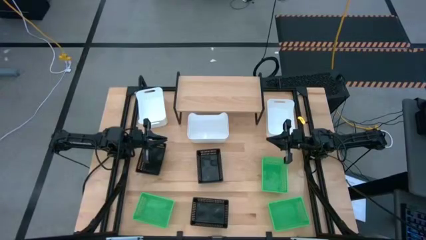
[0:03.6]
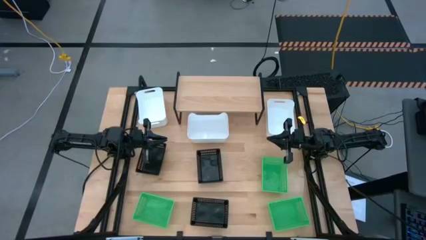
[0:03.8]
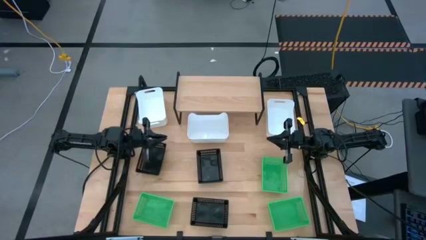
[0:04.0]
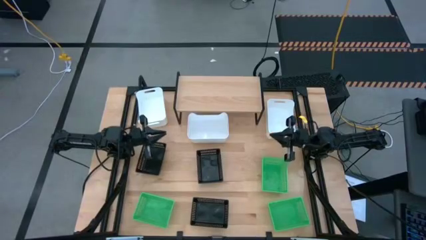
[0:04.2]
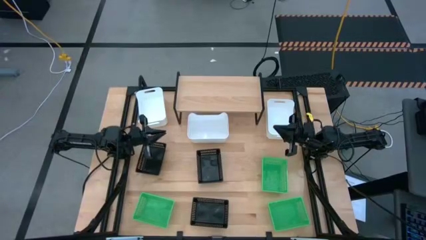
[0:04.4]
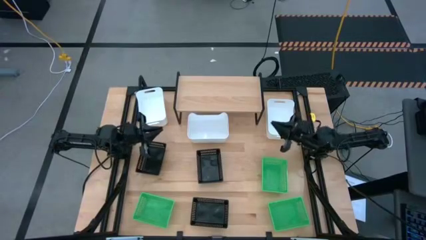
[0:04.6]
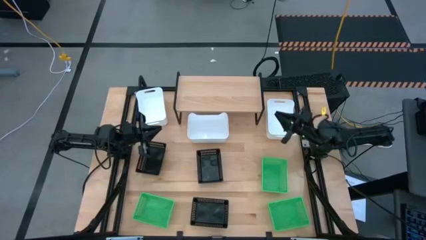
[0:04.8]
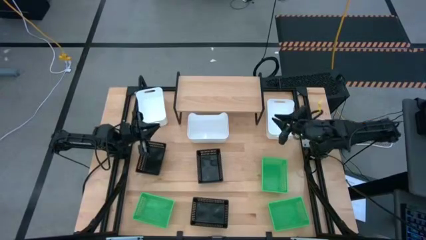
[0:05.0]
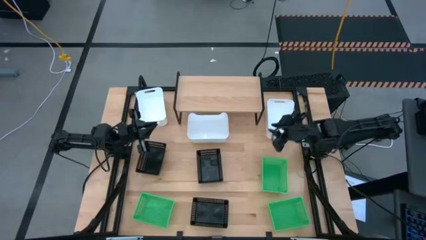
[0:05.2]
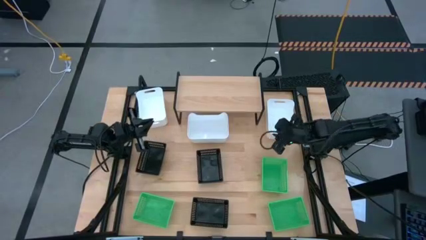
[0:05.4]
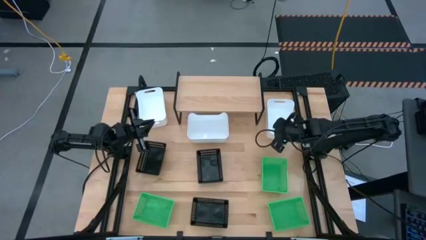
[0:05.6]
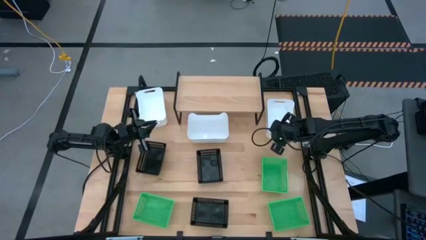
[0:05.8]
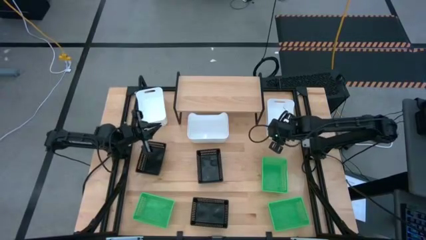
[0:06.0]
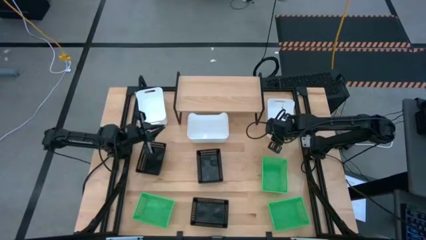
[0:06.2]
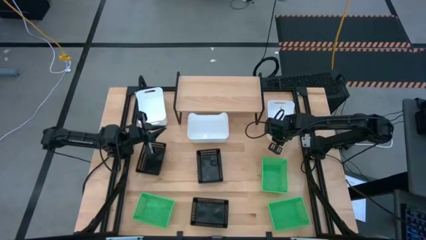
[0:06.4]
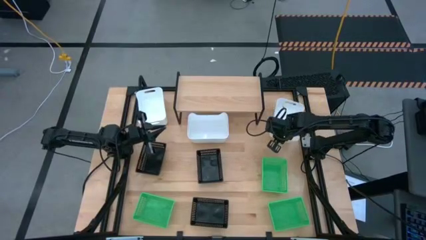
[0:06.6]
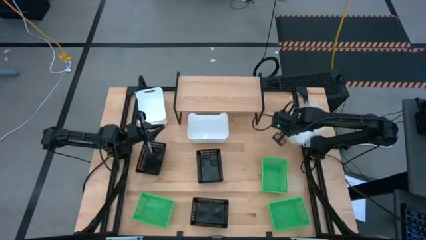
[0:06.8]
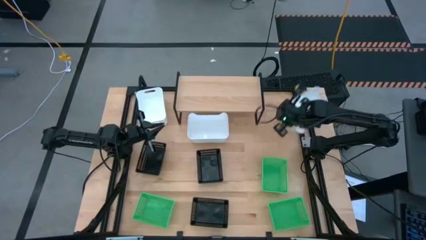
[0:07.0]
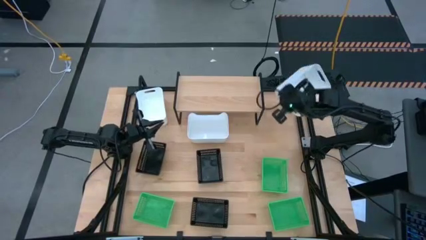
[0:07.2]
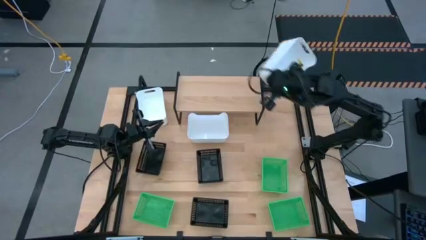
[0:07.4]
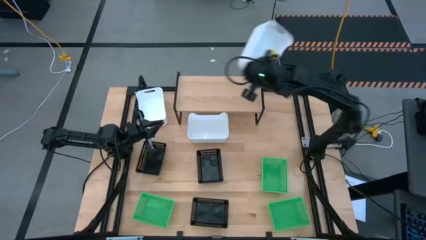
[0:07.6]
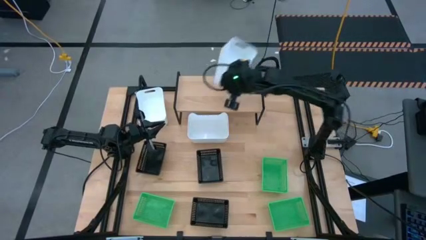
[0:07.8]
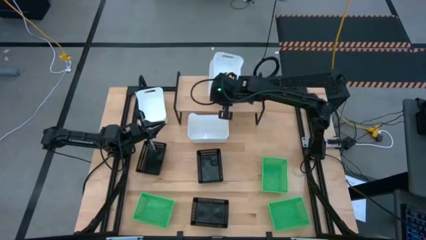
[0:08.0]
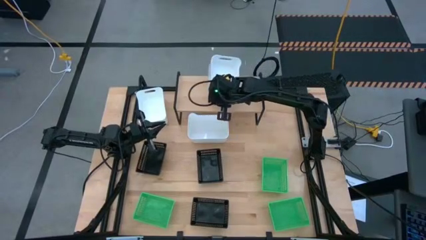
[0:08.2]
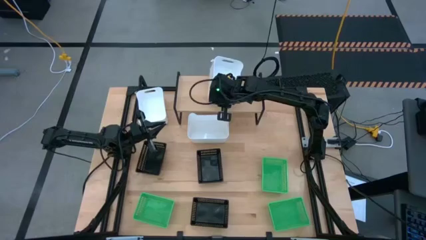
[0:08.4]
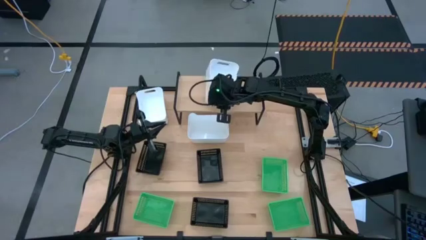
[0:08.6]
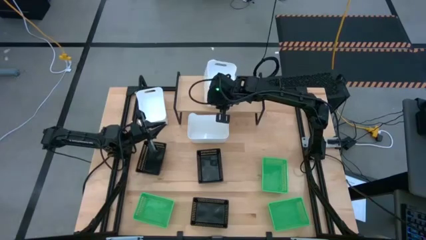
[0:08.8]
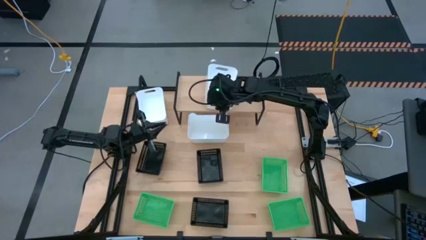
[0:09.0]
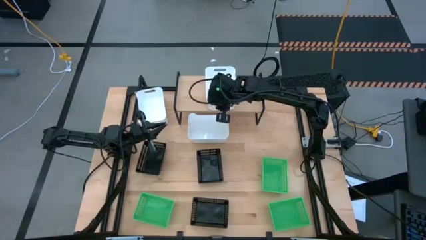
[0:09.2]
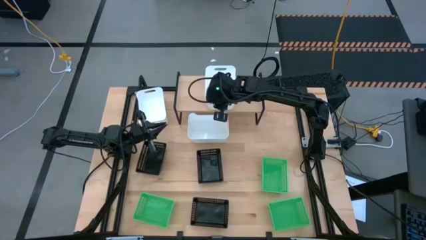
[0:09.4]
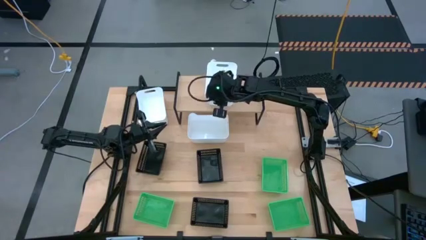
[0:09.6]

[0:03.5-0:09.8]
Task: Stack baskets on shelf by color
Put the right white bin on the shelf

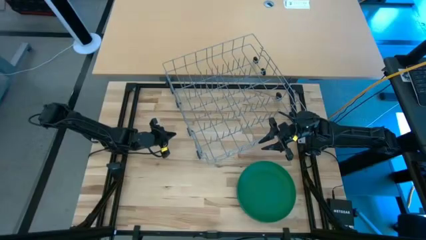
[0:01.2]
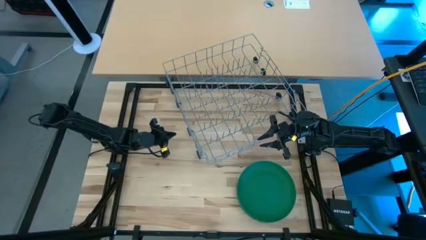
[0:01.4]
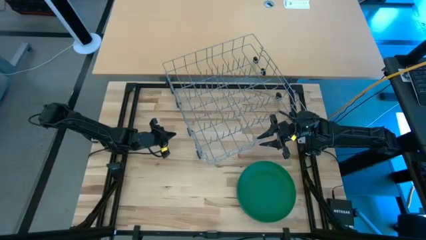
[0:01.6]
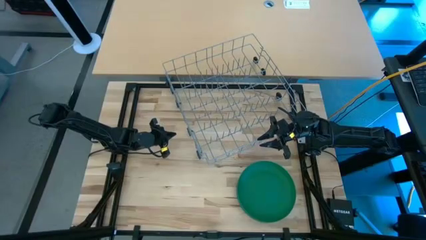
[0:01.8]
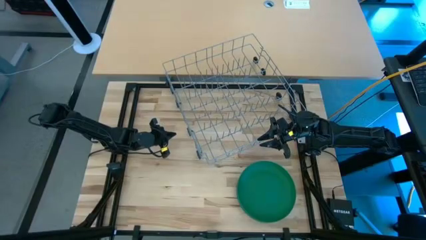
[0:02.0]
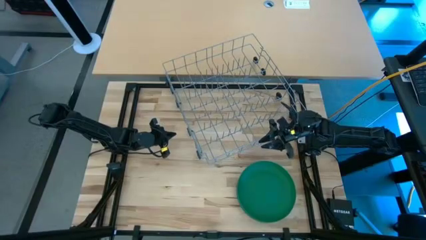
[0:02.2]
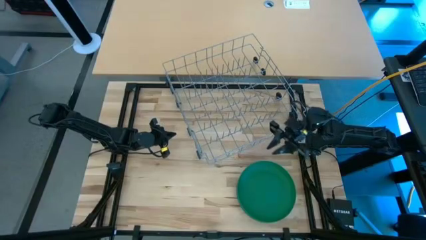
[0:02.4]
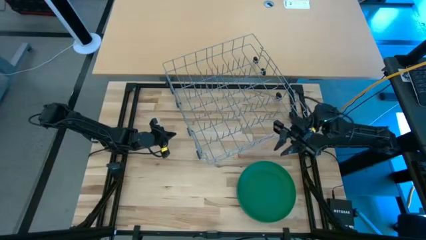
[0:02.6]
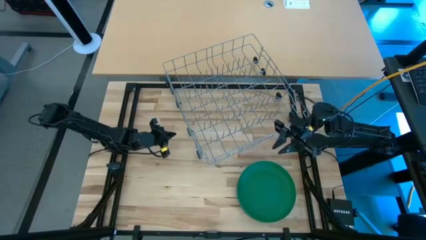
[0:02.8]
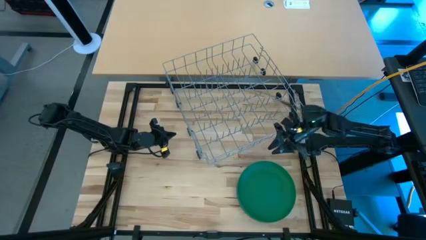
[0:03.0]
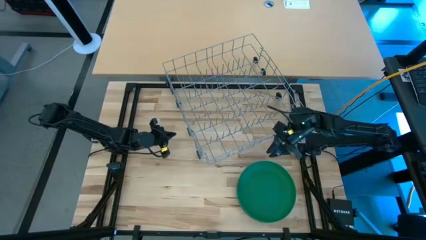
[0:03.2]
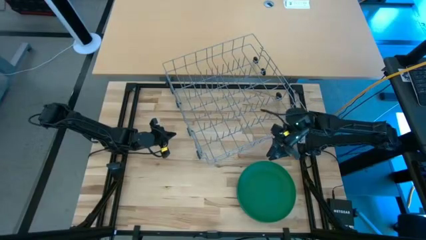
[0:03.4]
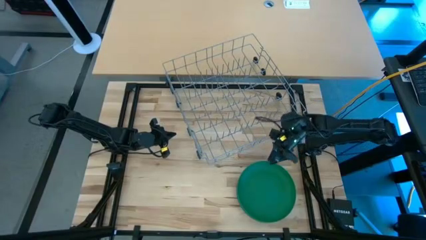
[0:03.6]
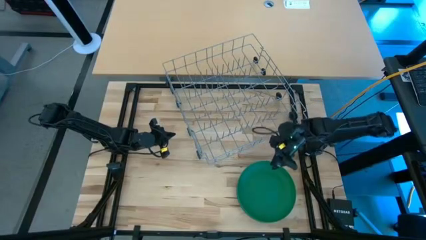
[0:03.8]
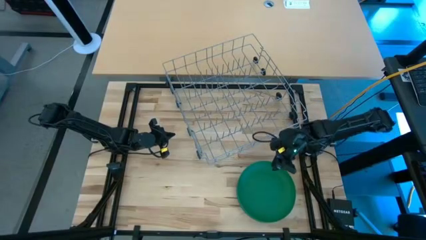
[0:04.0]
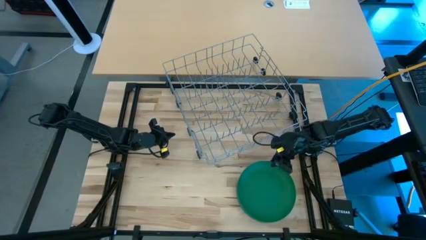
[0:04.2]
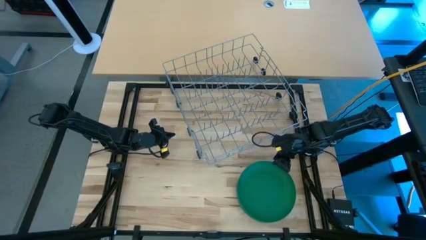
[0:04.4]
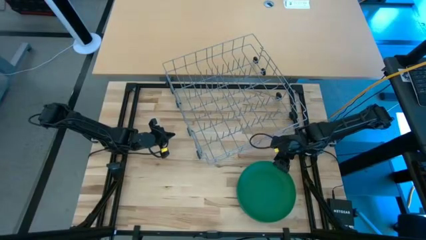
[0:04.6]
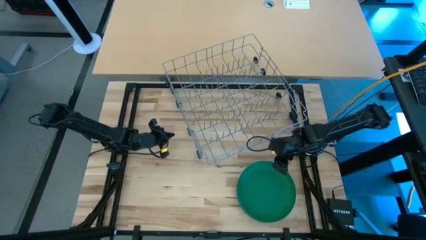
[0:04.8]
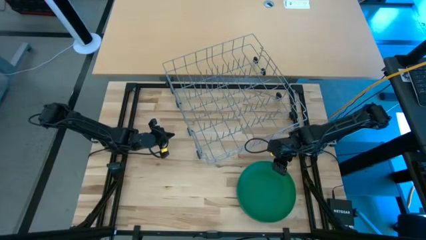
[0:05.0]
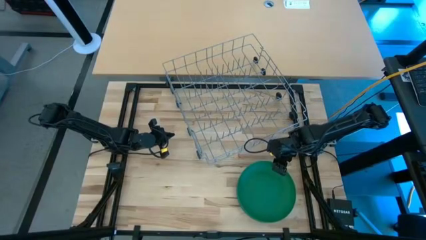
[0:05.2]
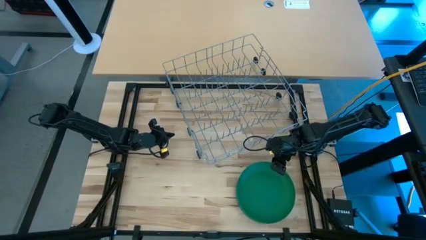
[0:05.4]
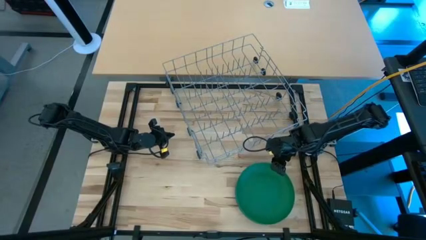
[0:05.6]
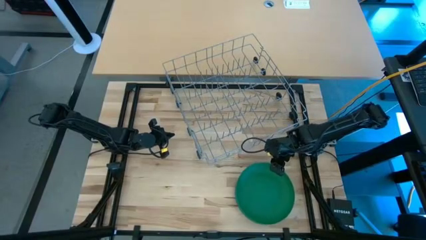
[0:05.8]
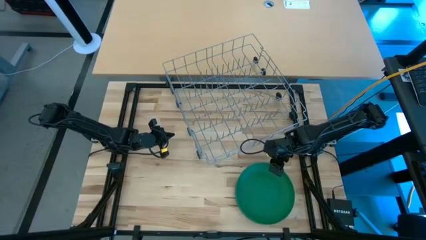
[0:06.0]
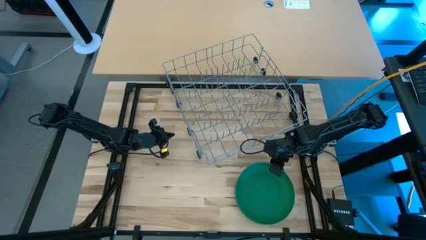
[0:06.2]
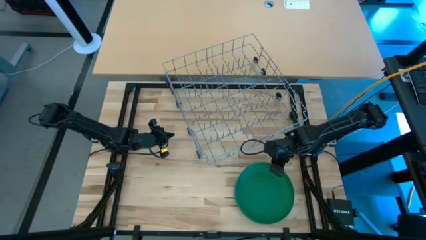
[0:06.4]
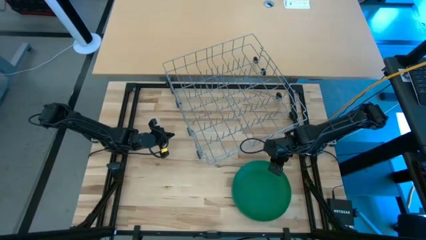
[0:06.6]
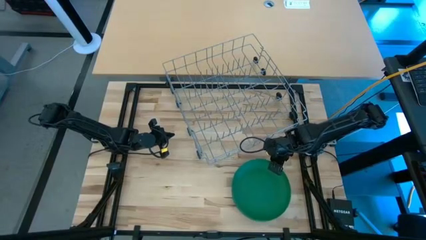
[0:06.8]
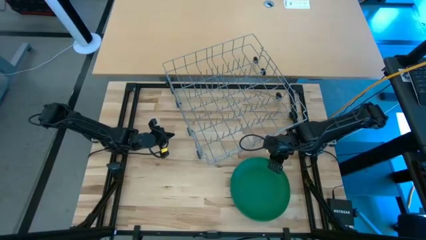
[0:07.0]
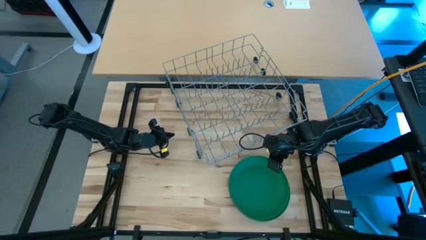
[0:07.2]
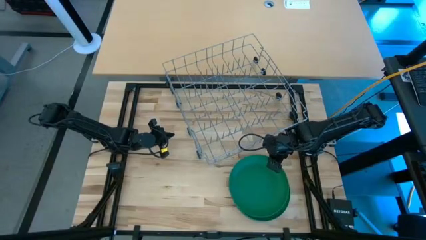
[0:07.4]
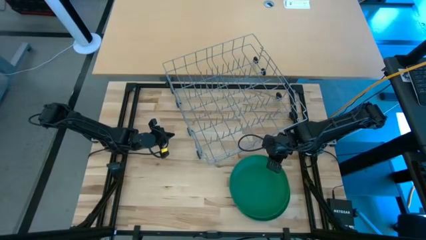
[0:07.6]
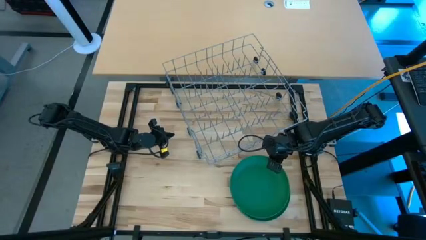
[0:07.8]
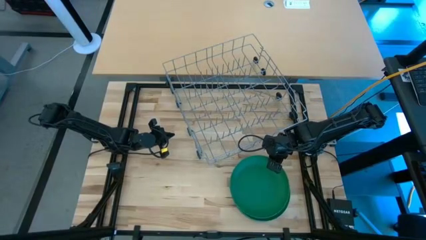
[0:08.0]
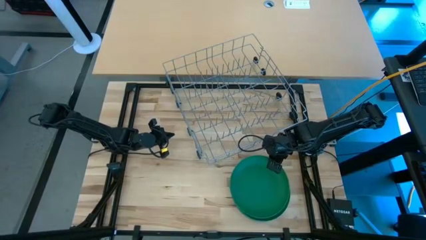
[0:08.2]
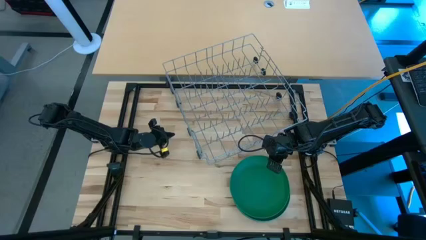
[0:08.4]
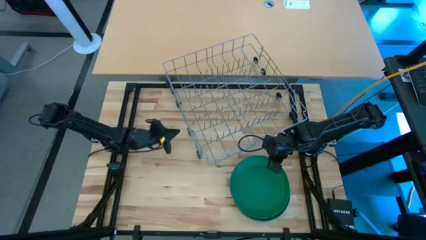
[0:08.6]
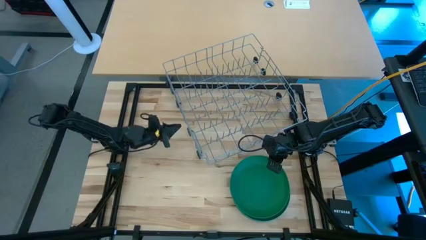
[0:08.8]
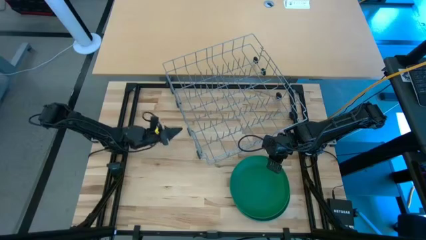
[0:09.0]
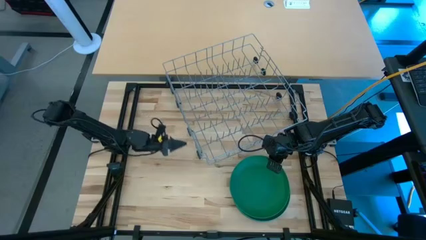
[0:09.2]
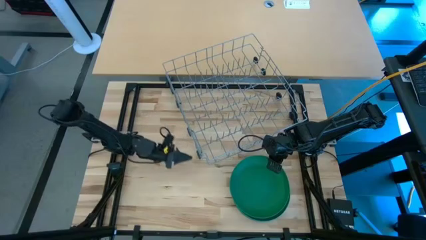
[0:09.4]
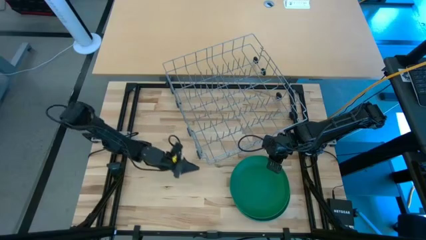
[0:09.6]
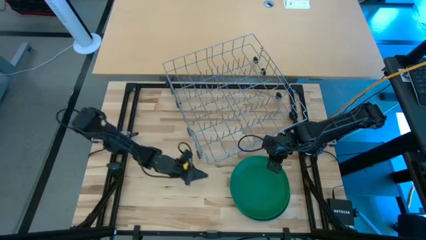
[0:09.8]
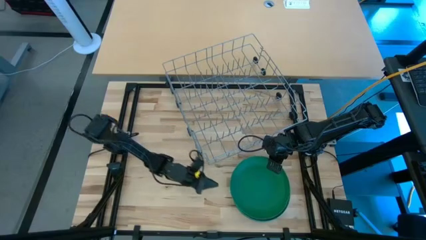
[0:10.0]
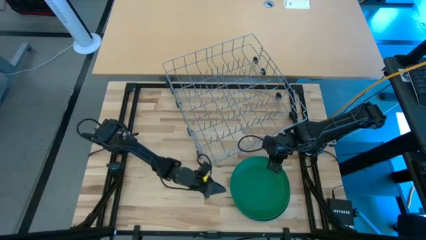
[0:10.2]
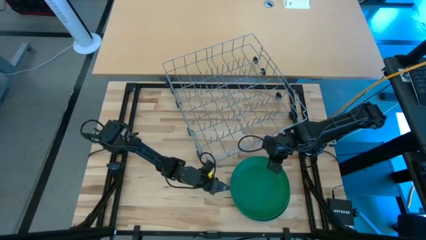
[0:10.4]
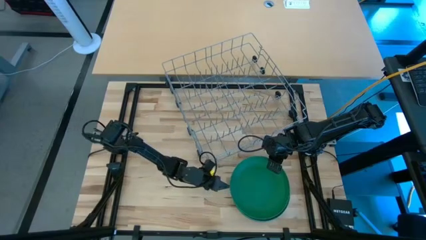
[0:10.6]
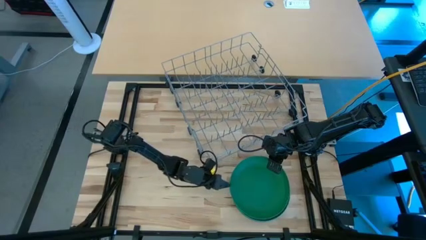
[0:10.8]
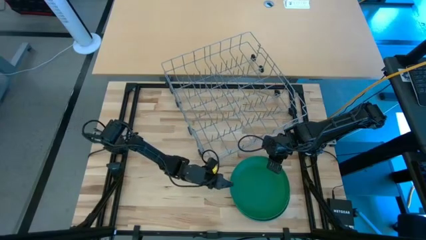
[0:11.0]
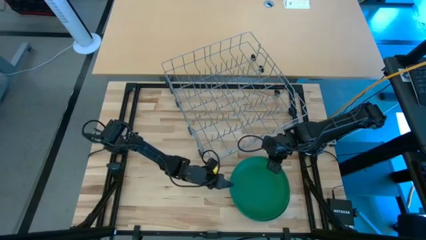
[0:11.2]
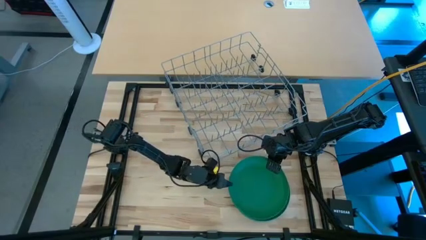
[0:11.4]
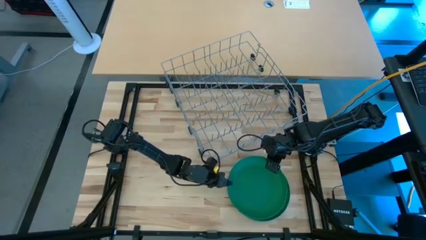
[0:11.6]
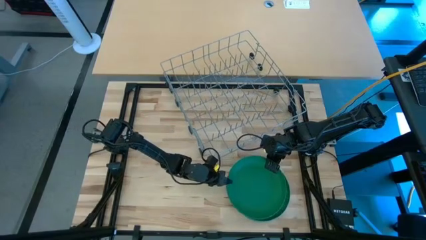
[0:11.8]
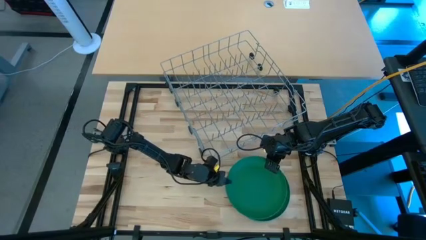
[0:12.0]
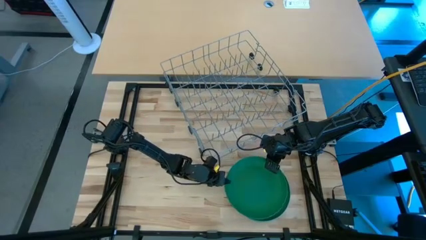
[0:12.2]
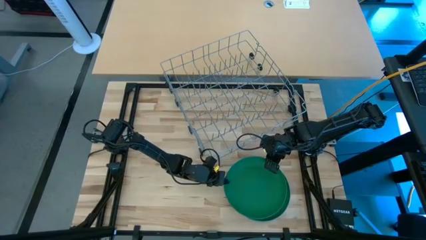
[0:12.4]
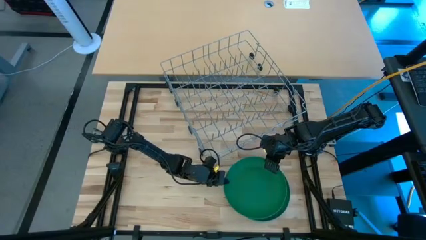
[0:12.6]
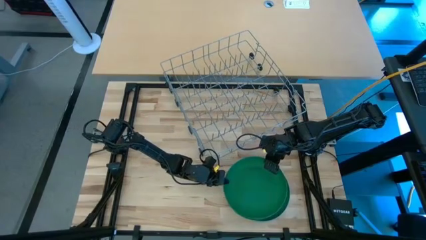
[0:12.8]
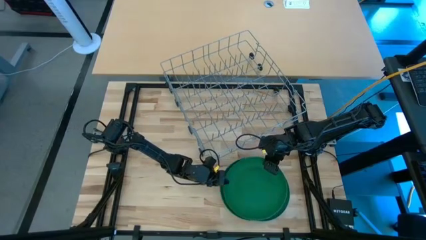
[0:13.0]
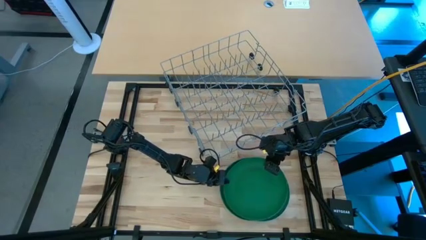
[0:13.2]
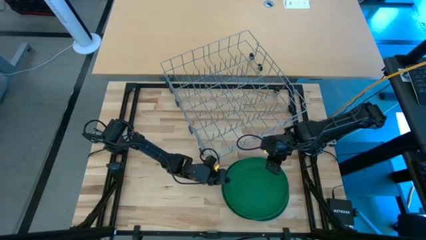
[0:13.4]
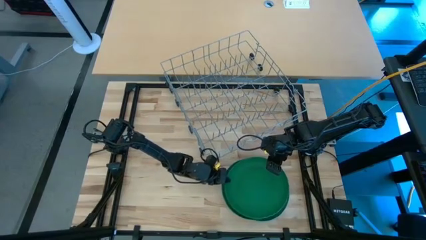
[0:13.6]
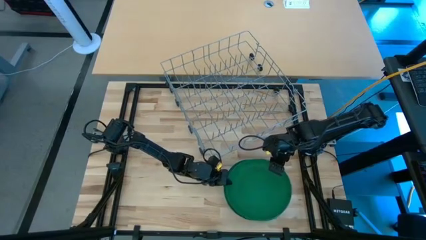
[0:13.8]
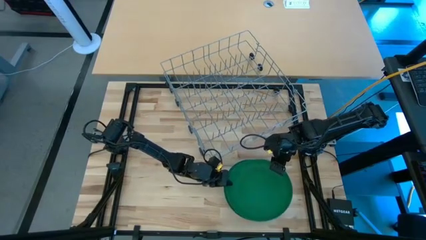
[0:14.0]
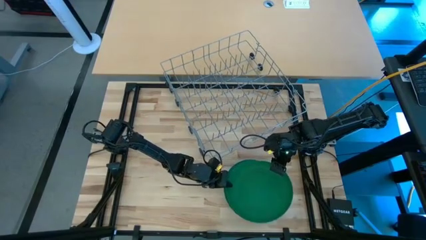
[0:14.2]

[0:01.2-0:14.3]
Task: Sort dishes
Put the green plate into the dish rack
